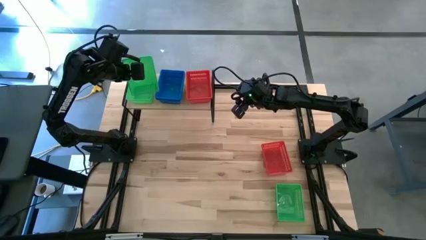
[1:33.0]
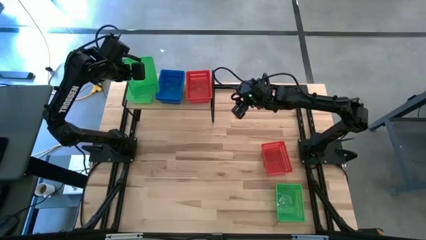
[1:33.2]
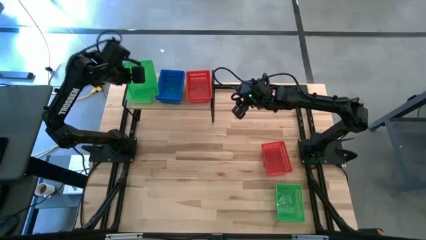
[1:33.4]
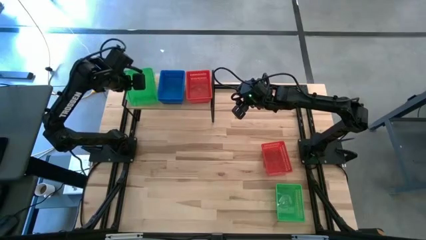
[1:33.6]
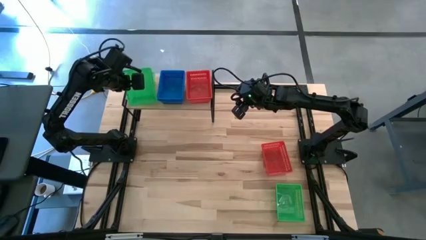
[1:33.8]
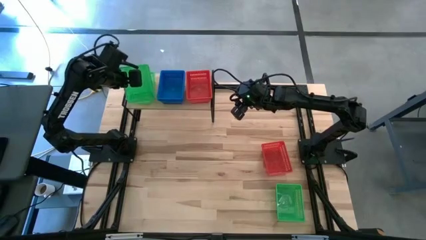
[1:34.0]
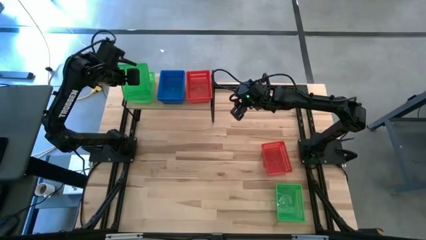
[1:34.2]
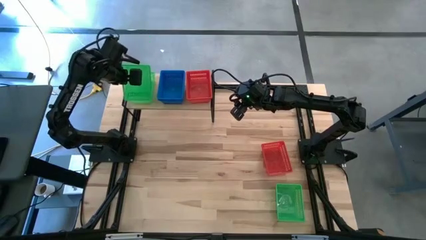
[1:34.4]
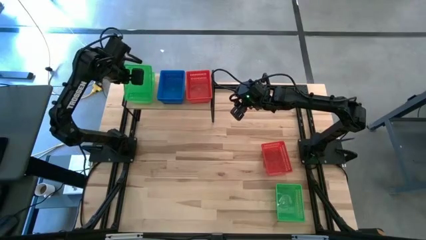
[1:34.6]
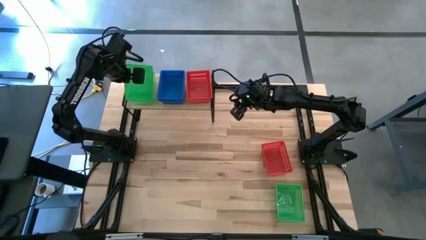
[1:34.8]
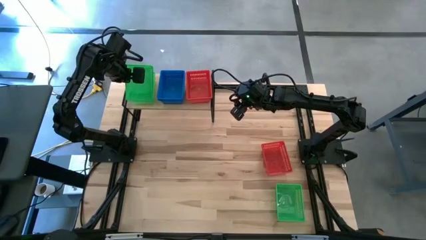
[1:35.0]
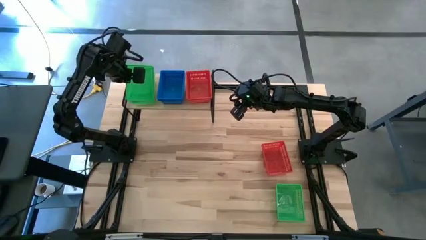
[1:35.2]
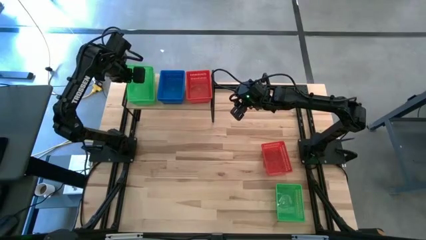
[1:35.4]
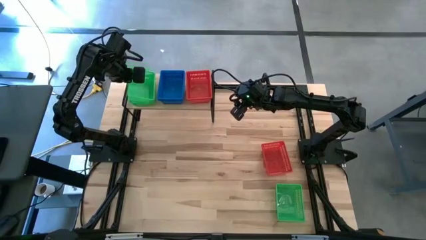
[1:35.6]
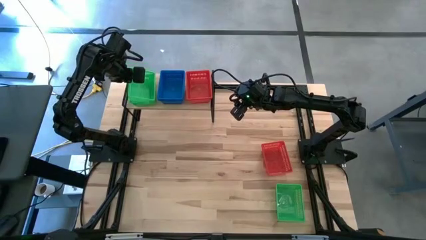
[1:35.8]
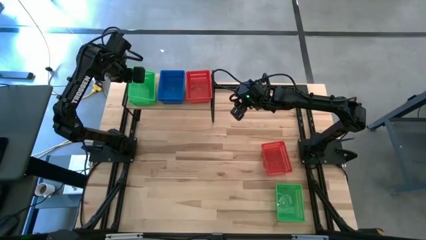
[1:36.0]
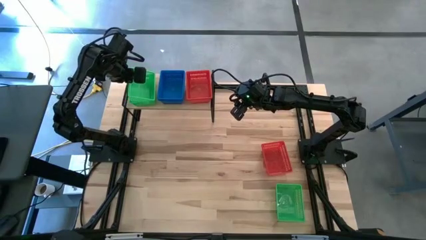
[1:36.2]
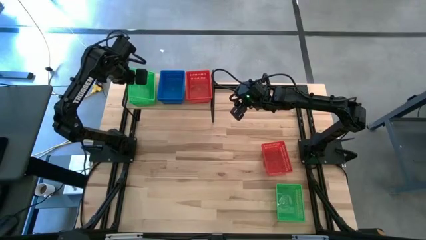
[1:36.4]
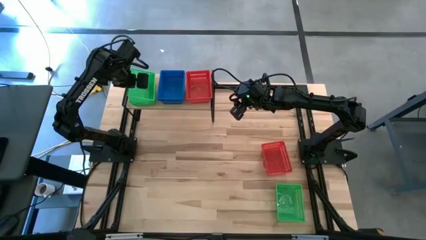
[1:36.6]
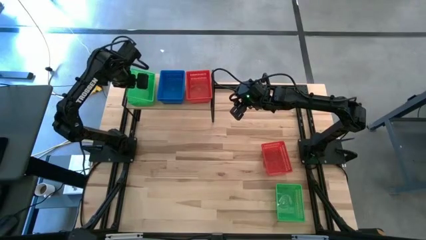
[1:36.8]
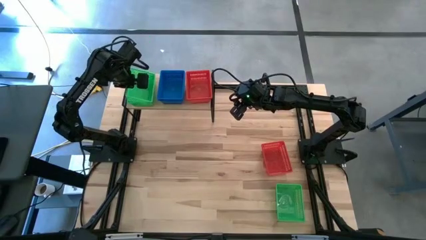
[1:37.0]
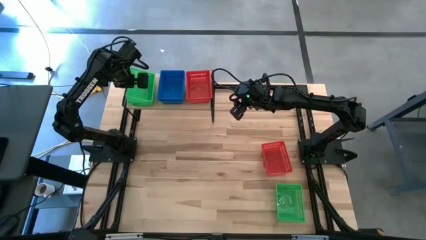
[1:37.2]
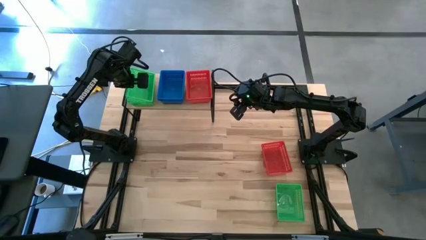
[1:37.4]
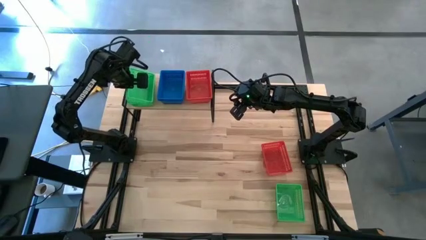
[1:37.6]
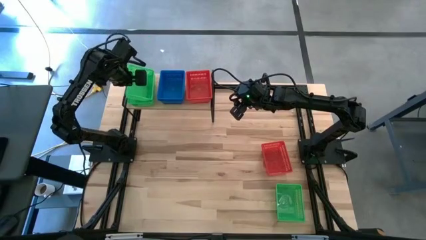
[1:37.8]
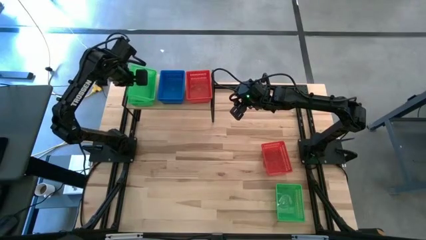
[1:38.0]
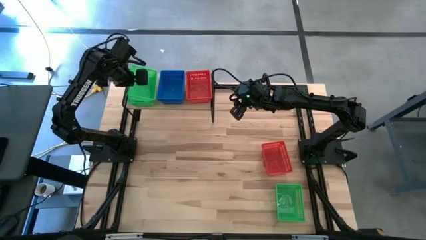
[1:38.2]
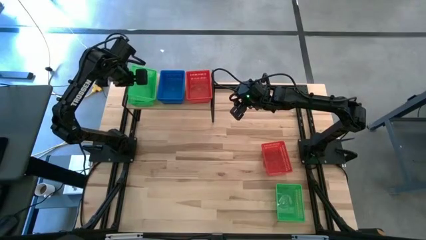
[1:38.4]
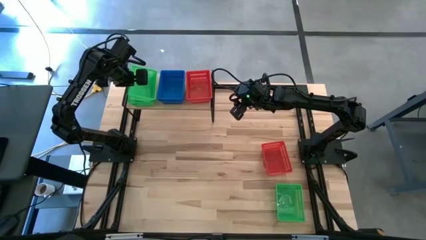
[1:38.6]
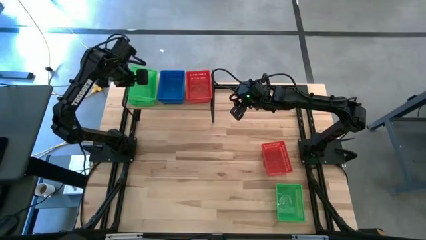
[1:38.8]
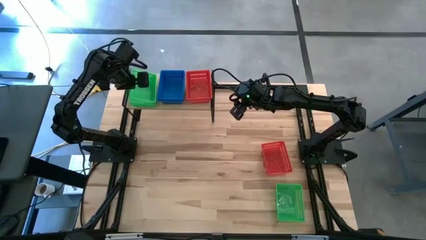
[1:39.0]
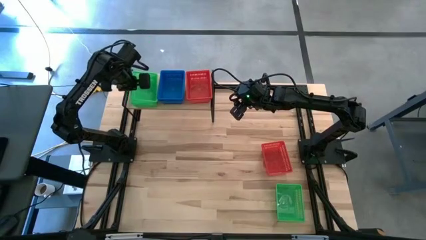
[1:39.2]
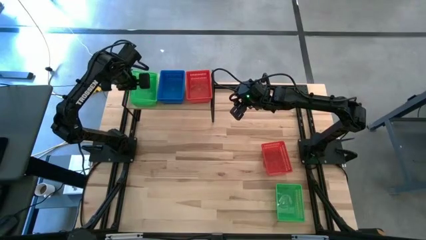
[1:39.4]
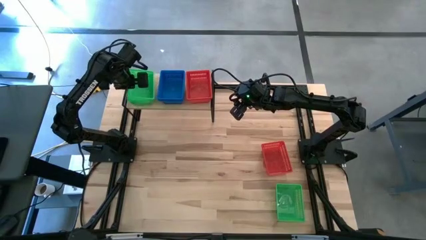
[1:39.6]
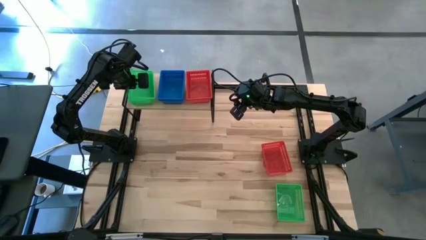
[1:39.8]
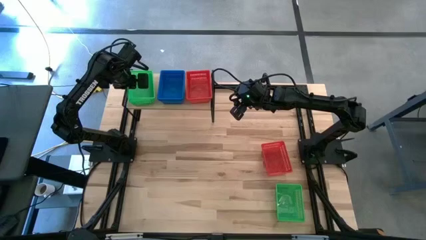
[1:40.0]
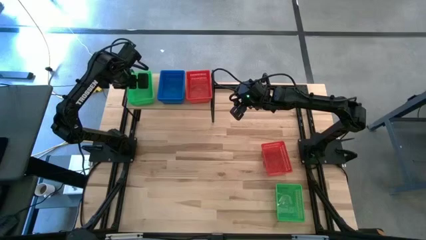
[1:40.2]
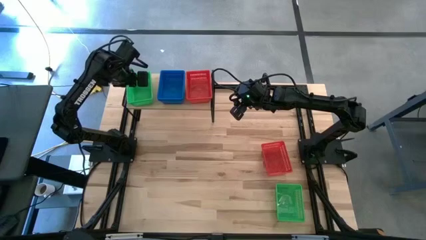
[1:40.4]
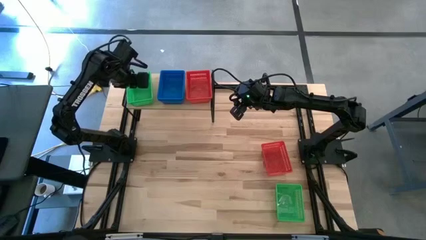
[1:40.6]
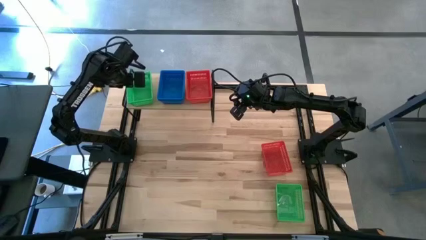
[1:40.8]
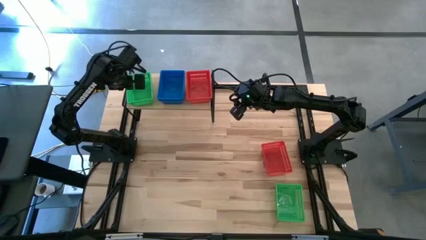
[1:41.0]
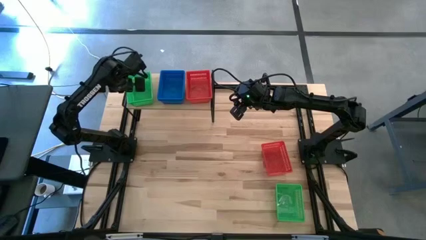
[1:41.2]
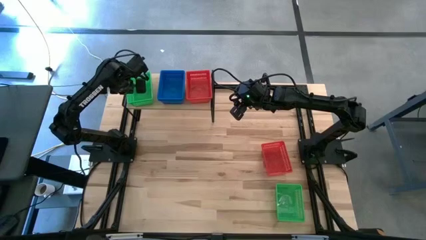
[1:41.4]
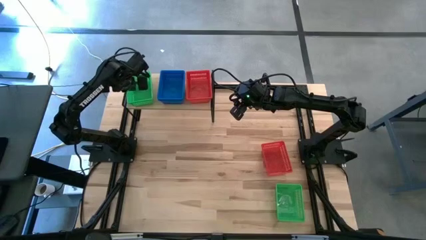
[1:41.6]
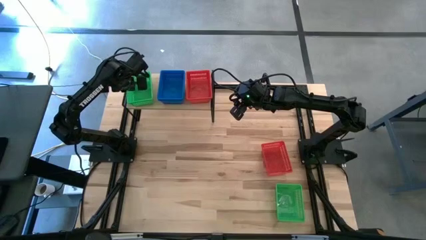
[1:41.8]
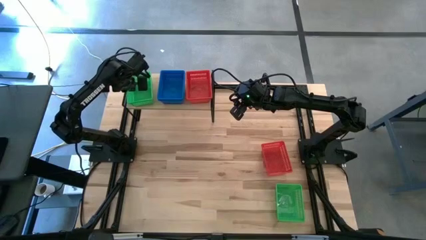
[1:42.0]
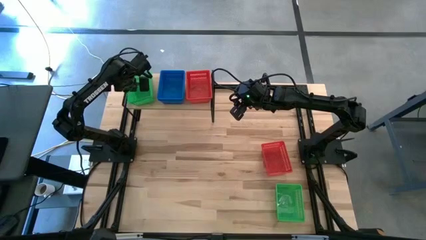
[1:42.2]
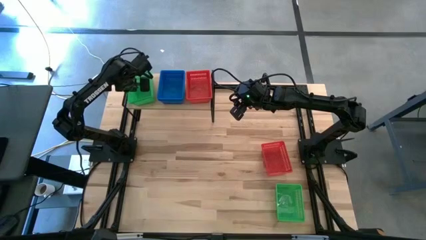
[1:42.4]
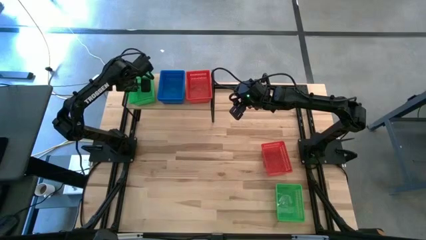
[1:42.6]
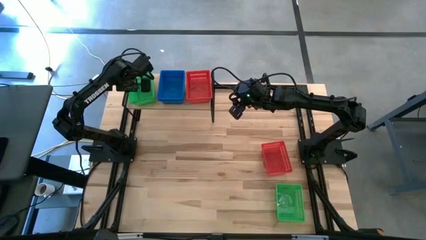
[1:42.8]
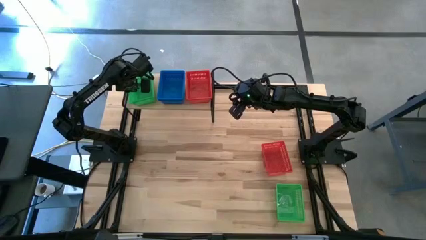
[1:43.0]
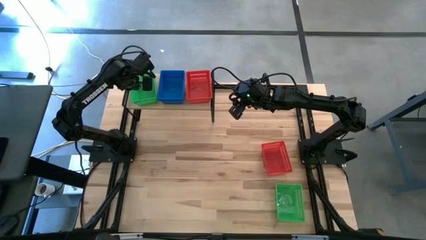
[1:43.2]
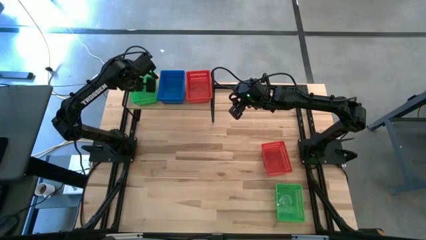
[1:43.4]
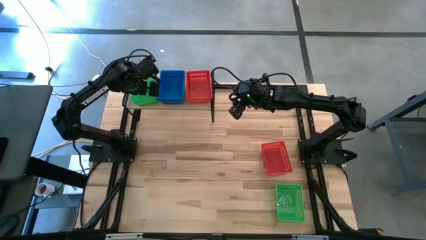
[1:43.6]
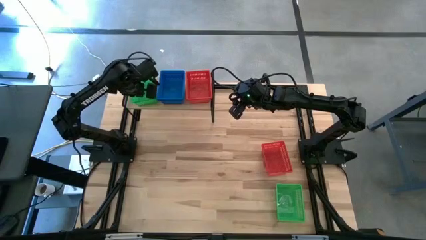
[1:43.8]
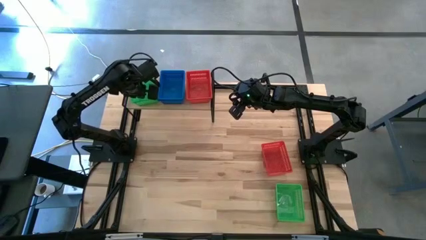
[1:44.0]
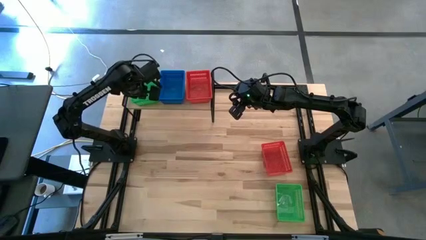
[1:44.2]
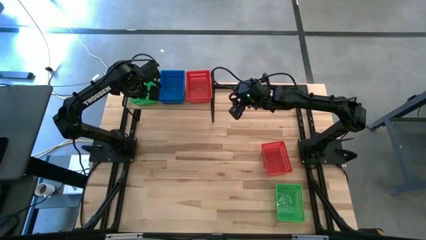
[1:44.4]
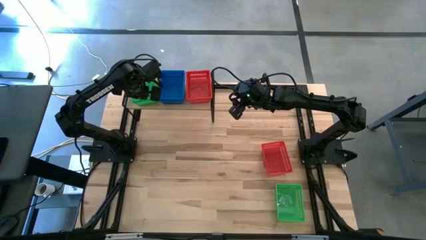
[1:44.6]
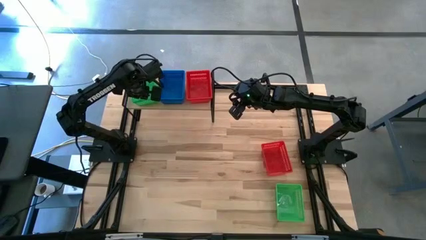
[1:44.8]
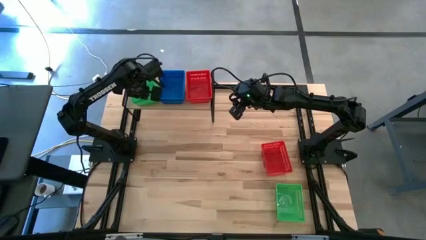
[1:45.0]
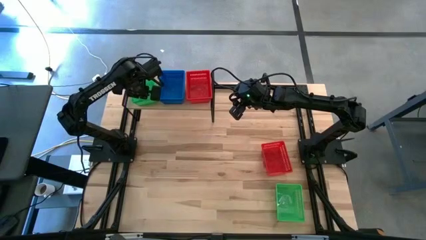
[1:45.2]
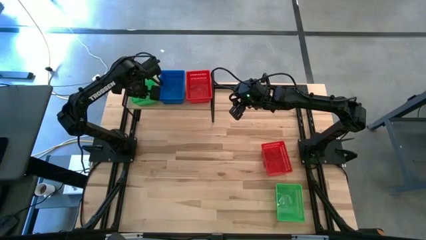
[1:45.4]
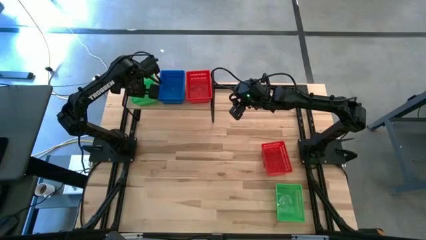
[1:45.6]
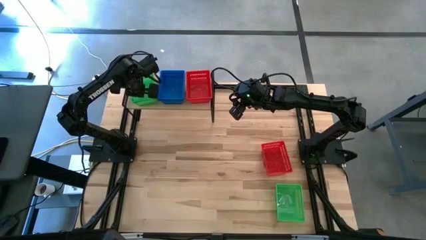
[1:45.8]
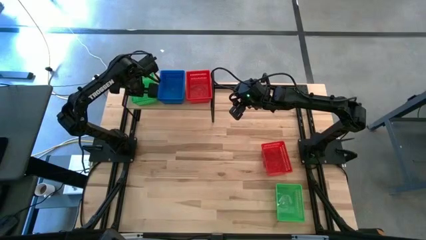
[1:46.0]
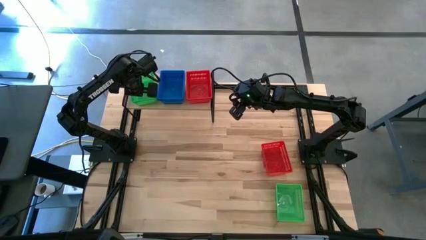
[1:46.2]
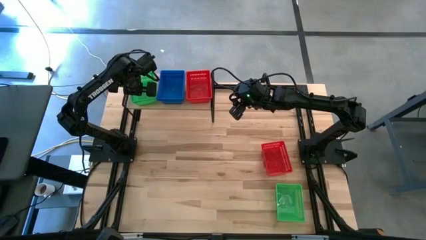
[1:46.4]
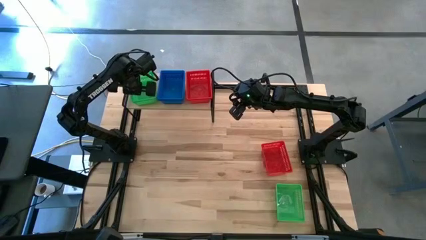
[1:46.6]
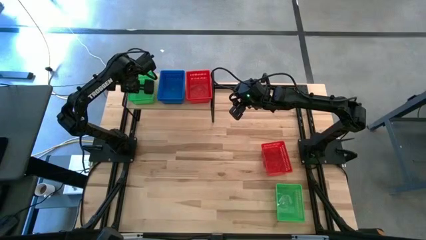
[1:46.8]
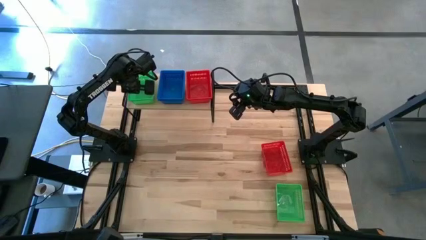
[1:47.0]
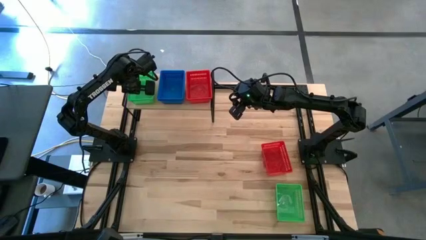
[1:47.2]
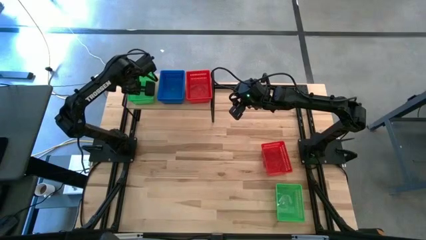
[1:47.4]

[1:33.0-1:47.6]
Task: Stack baskets on shelf by color
Stack the top green bin on top of the green bin on the shelf

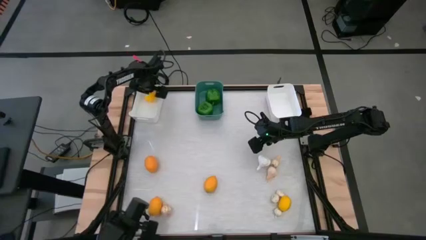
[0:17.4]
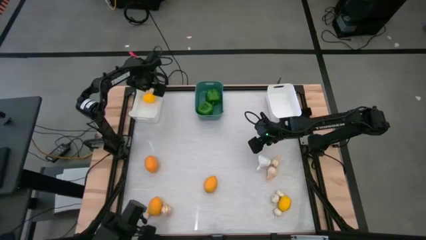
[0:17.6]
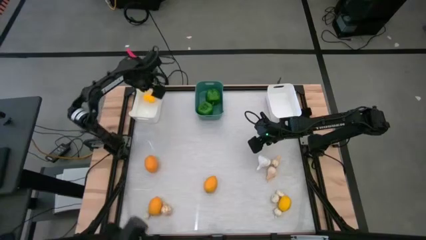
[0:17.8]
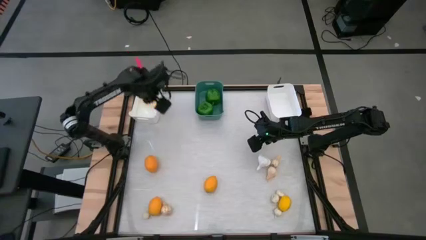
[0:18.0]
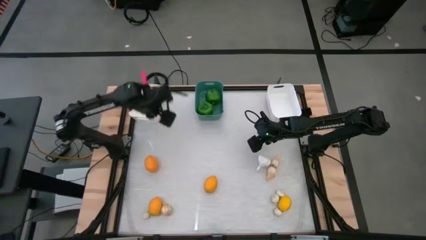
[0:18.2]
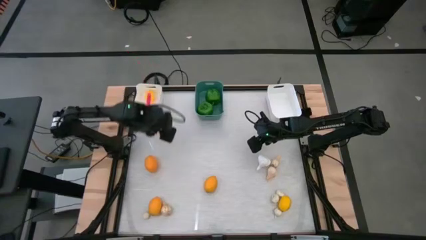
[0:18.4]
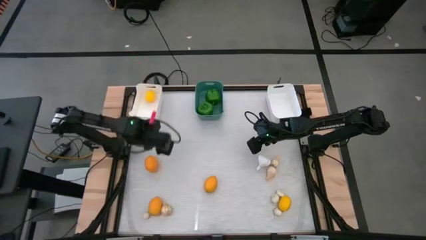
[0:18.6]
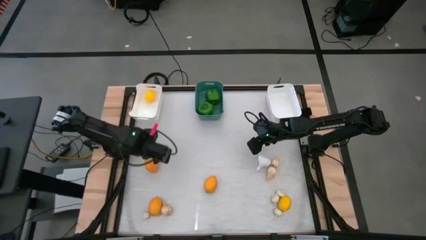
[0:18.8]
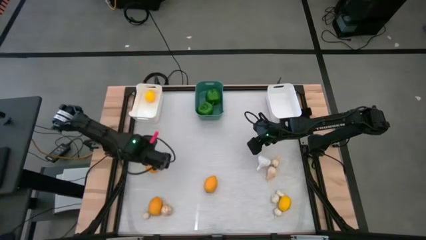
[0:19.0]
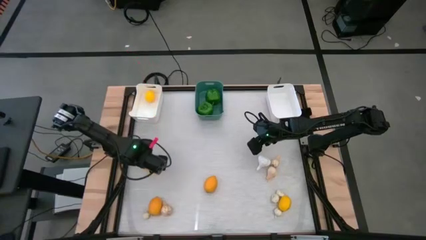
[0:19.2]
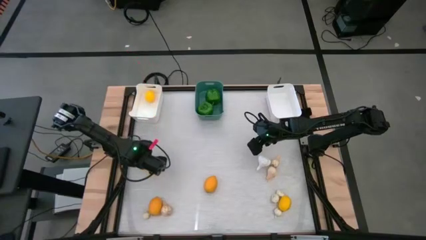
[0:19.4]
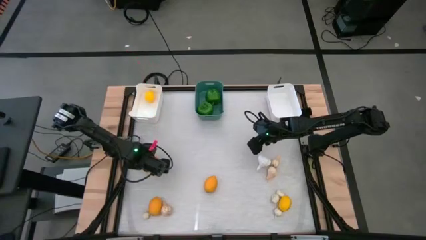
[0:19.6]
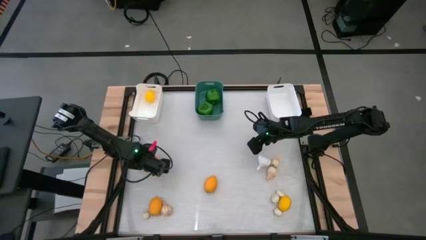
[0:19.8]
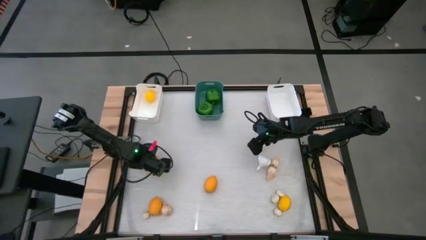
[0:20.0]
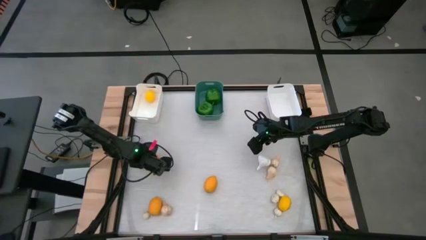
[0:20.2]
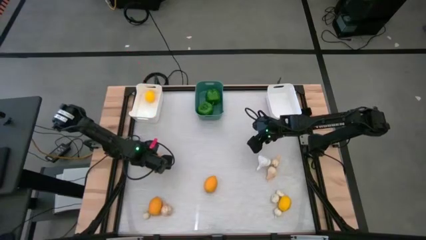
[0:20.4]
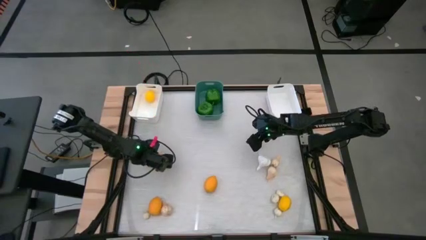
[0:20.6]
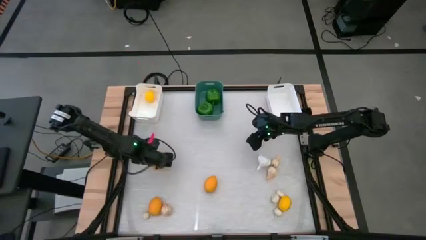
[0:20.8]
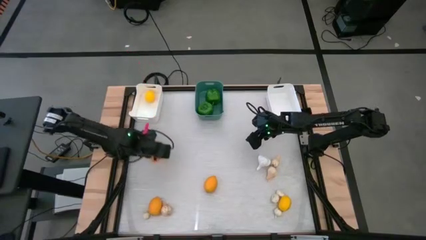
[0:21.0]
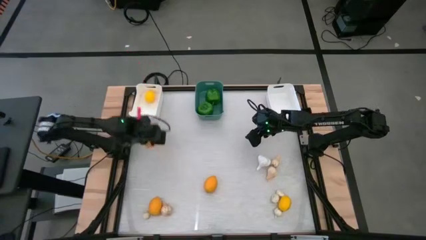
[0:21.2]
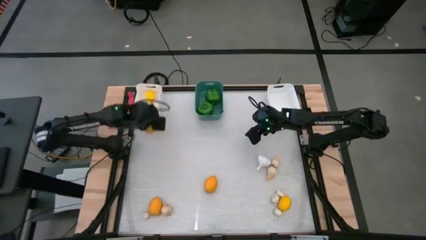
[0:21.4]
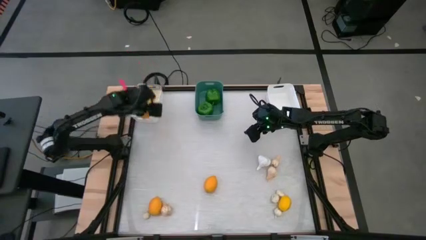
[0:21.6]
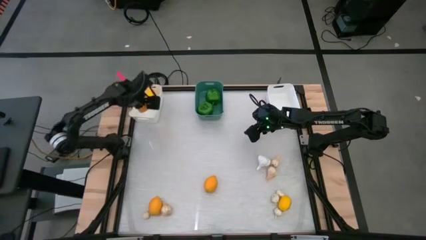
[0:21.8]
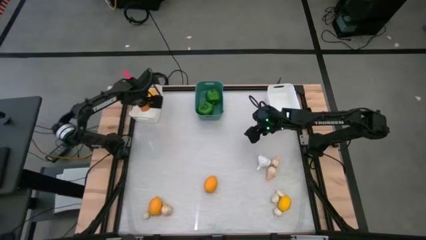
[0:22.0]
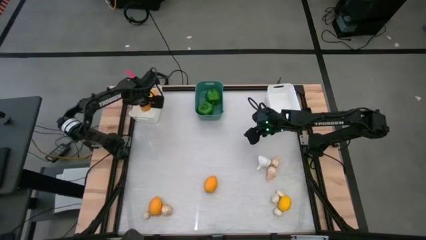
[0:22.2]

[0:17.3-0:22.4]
Task: Sort produce into baskets
Put the top left yellow lemon into the left white bin
